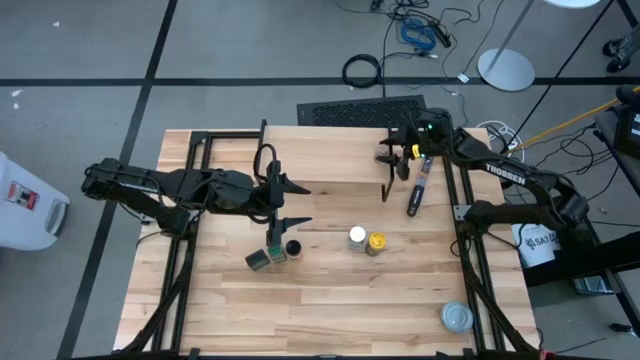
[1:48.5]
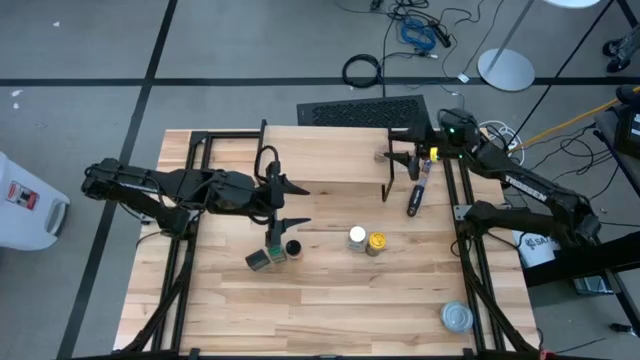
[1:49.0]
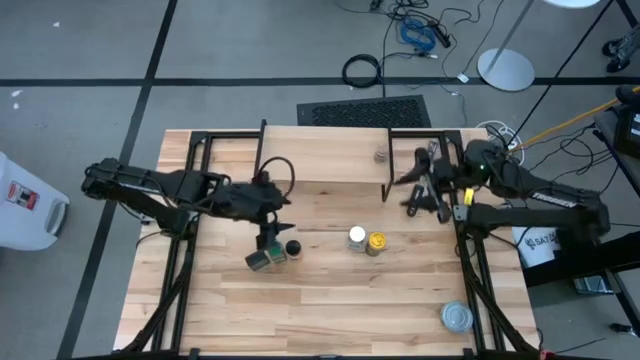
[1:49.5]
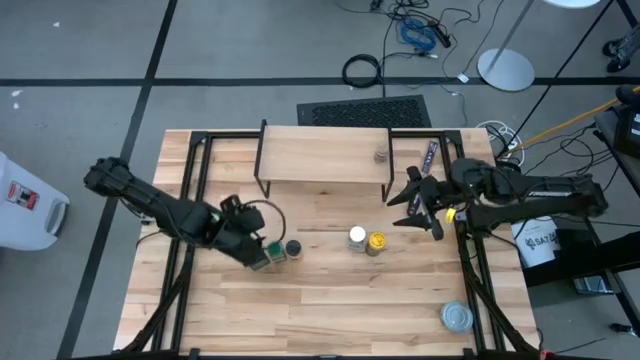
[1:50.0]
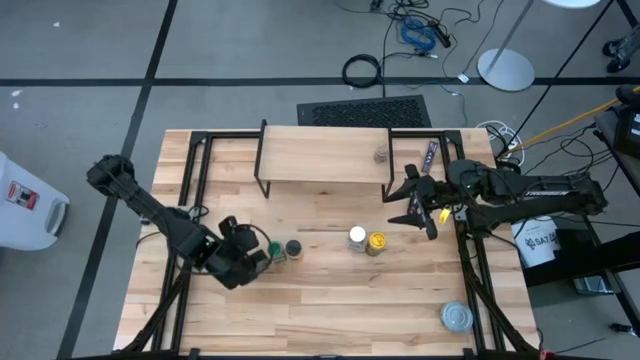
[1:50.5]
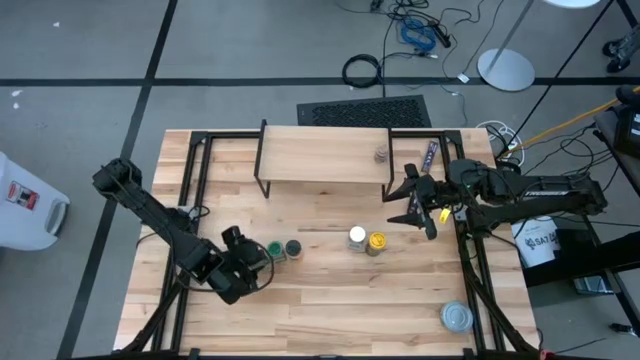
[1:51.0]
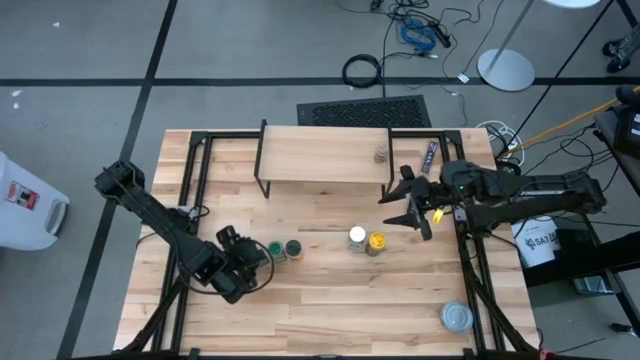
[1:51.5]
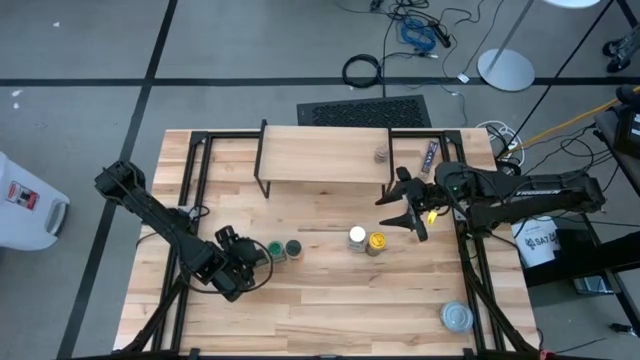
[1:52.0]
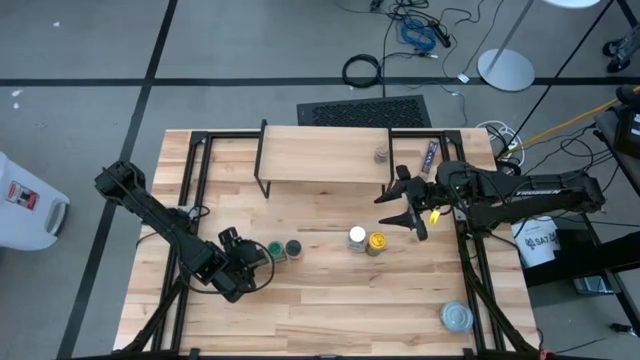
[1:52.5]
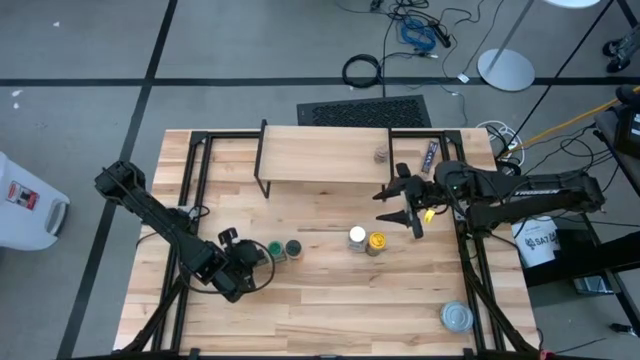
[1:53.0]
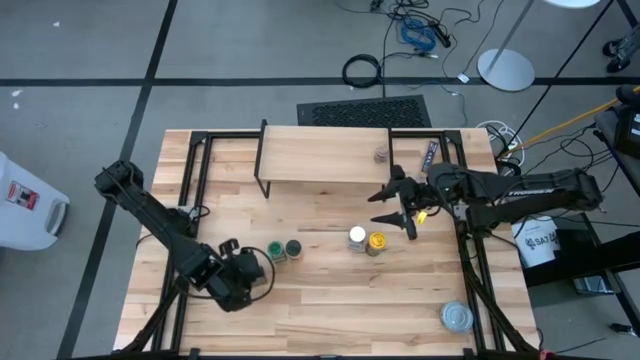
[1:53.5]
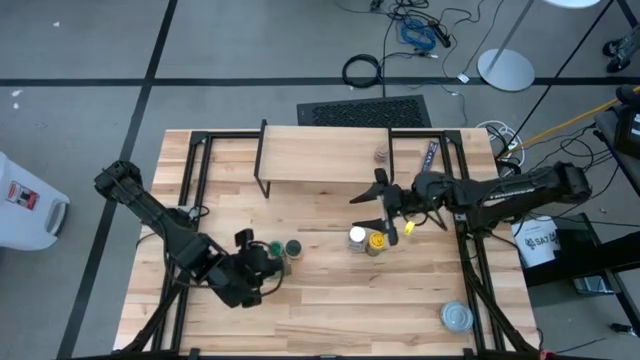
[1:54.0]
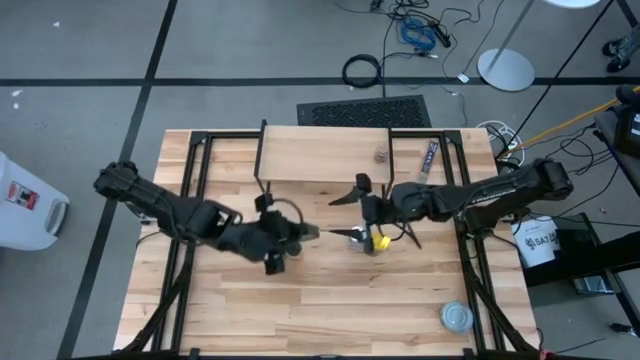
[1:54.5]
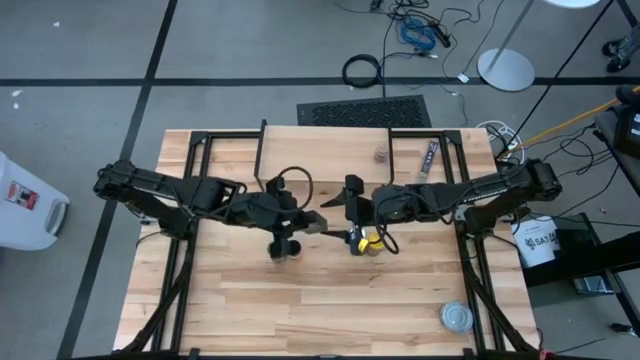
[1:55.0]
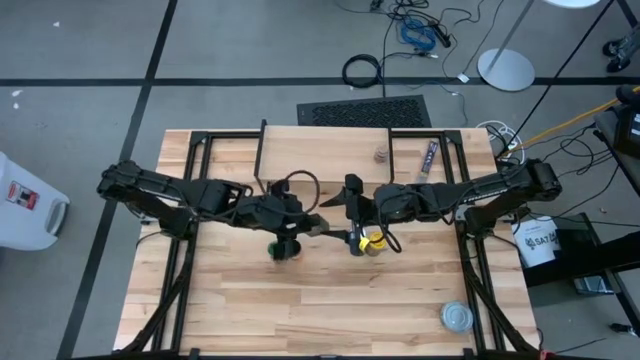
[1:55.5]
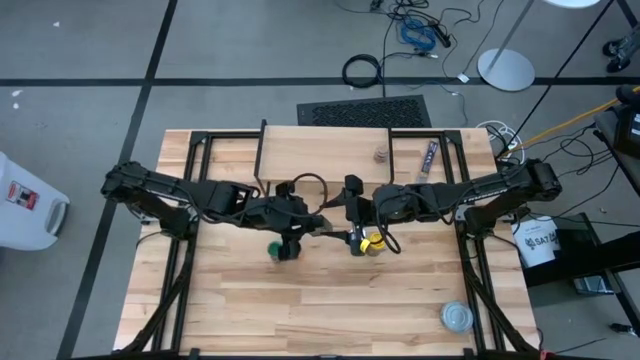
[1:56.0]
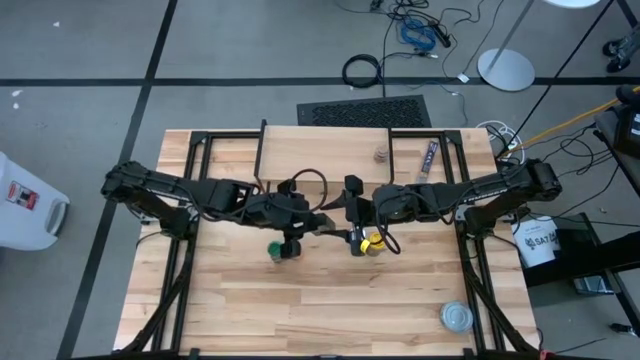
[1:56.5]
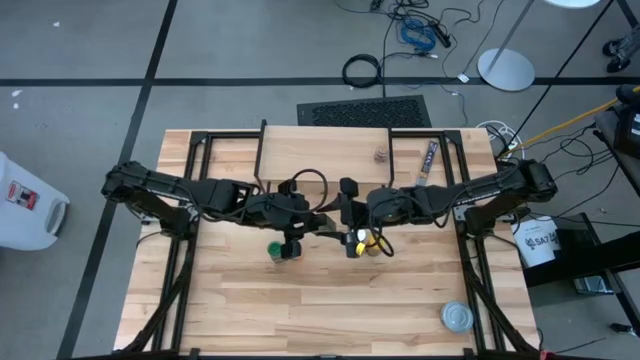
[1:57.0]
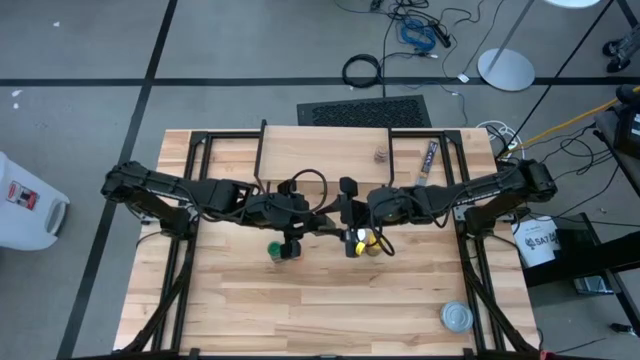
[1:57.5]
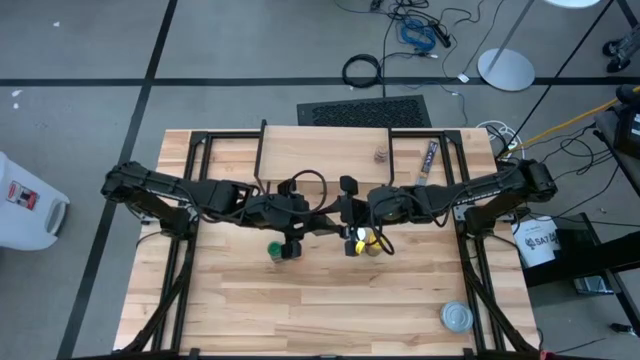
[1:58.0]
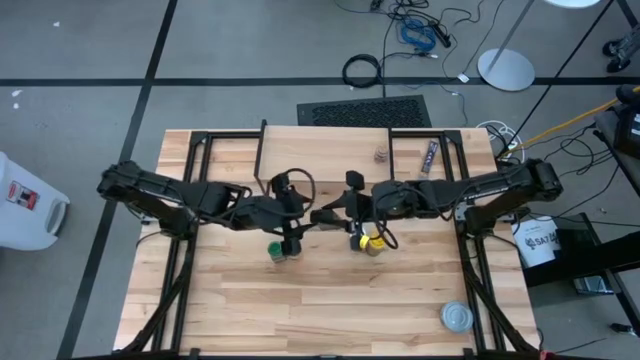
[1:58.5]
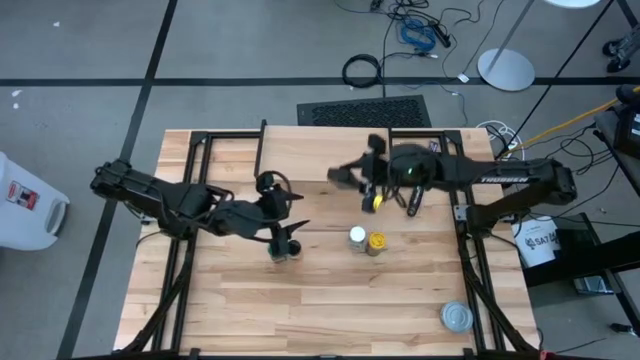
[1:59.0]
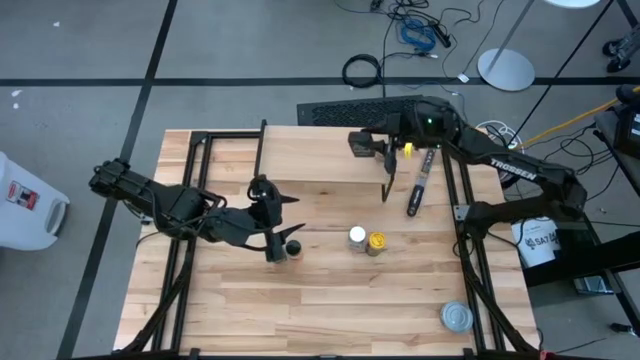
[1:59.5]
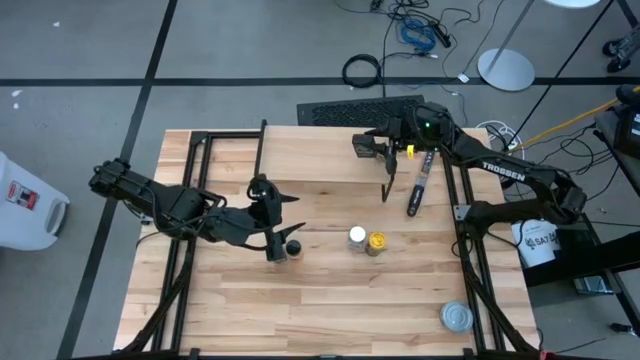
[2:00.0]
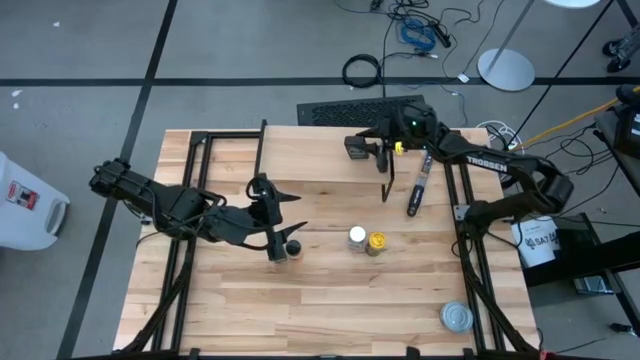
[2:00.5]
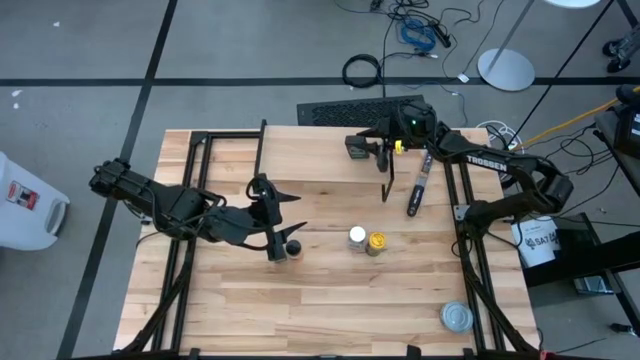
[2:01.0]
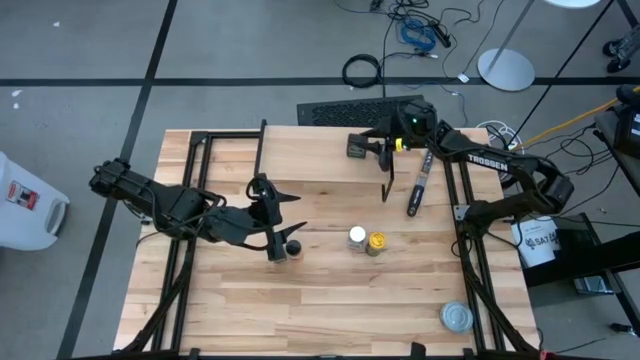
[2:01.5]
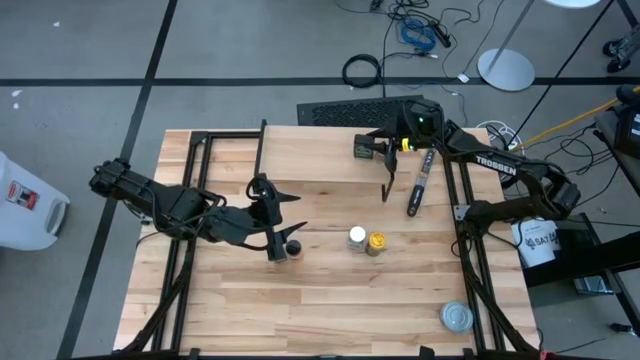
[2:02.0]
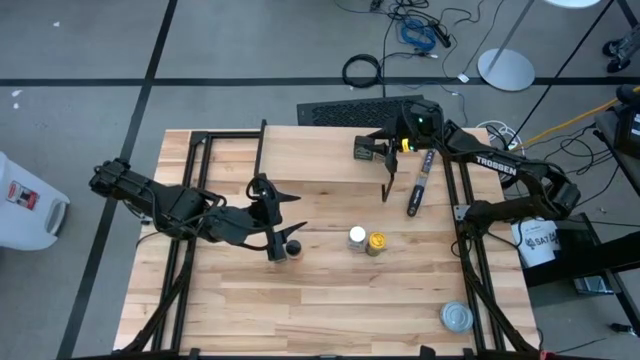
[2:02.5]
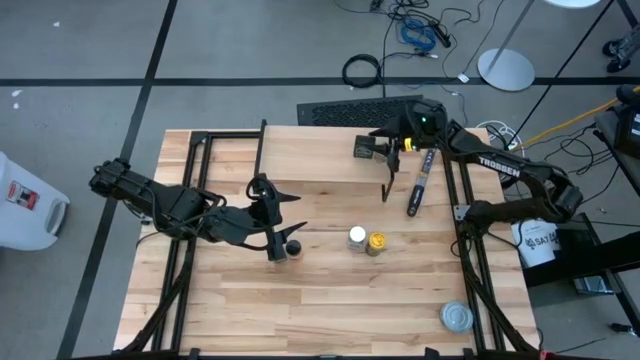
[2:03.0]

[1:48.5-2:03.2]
Task: Shelf spices
Put the black seasoning can on the shelf

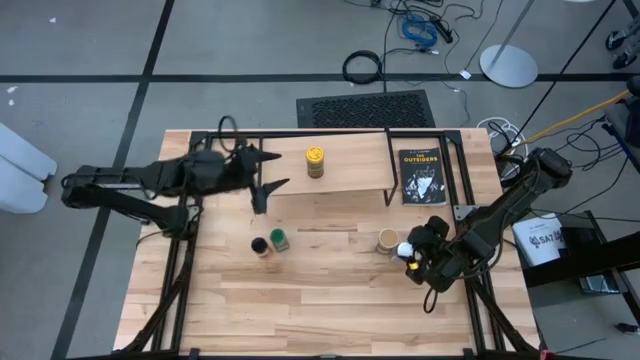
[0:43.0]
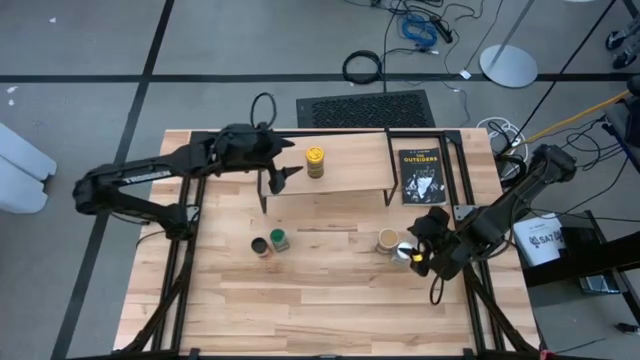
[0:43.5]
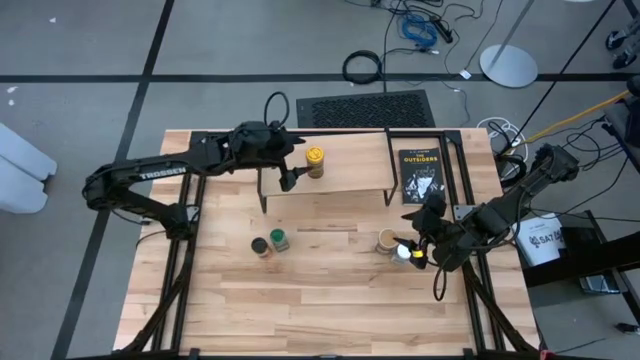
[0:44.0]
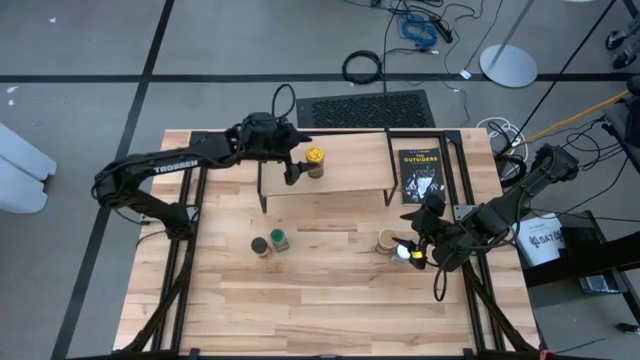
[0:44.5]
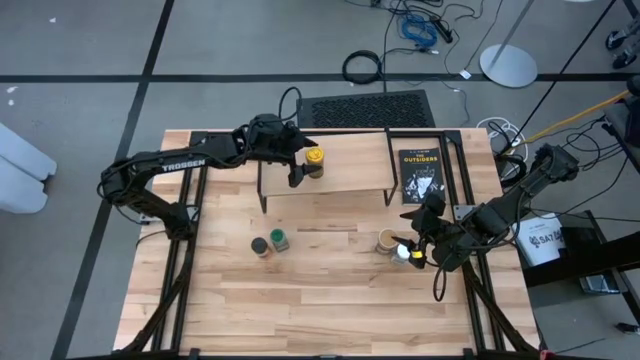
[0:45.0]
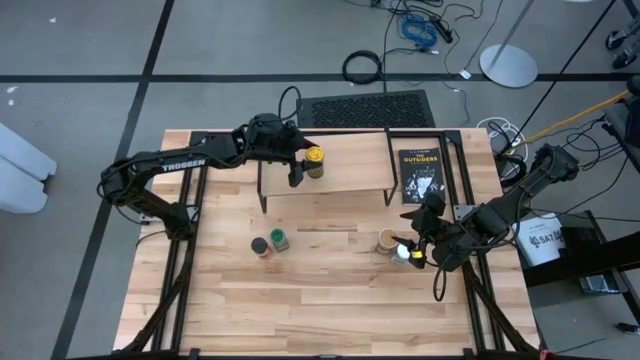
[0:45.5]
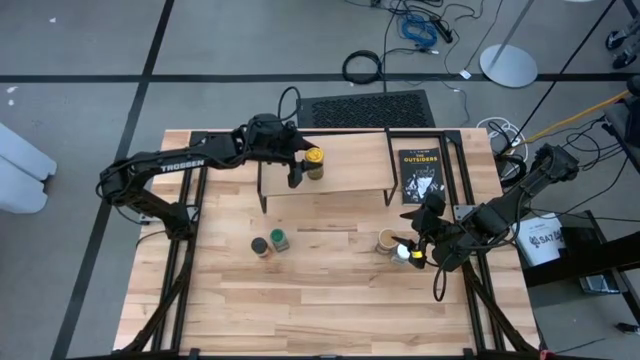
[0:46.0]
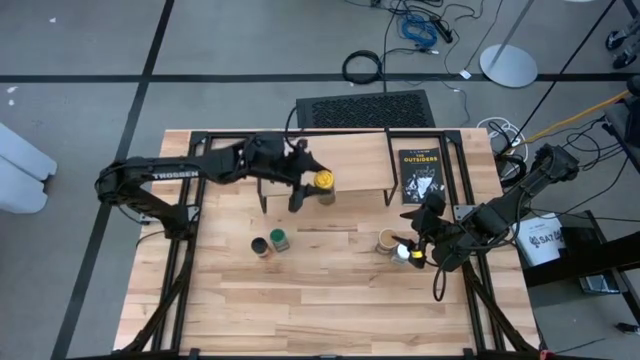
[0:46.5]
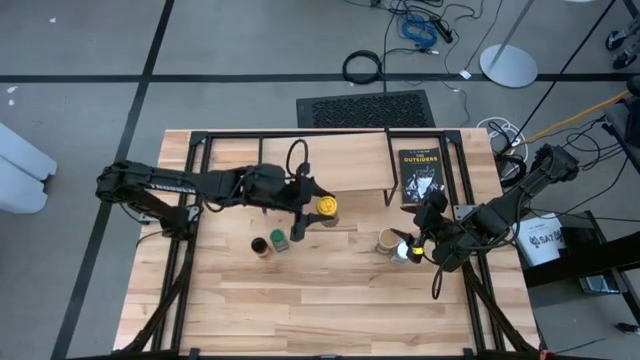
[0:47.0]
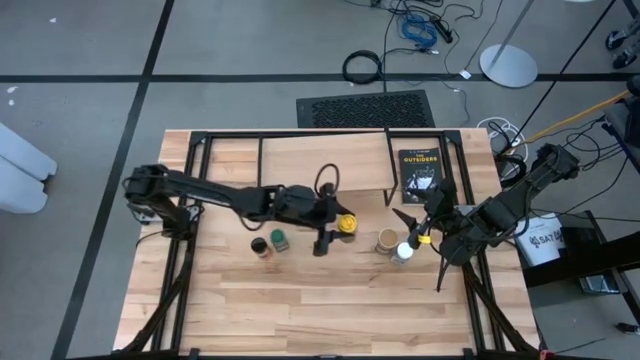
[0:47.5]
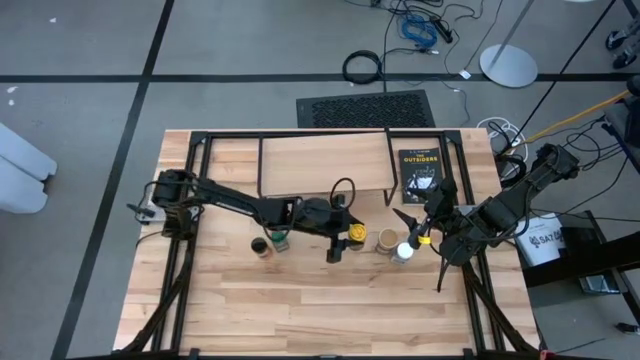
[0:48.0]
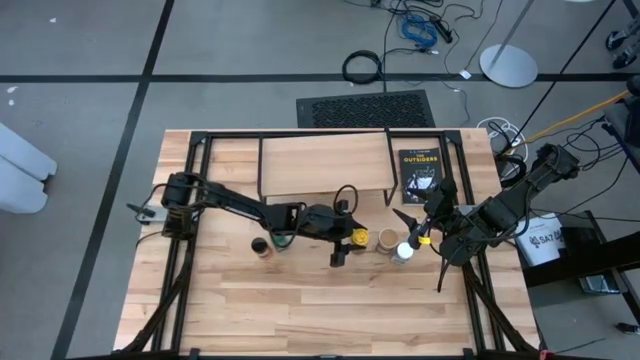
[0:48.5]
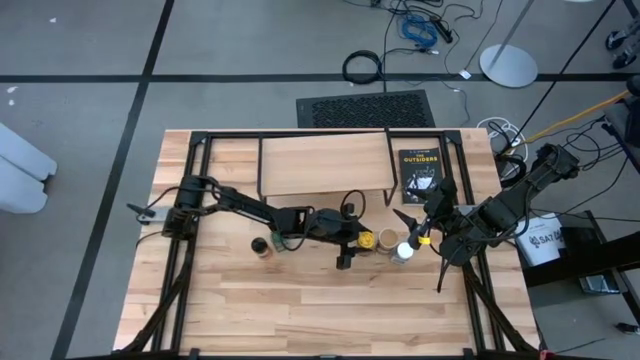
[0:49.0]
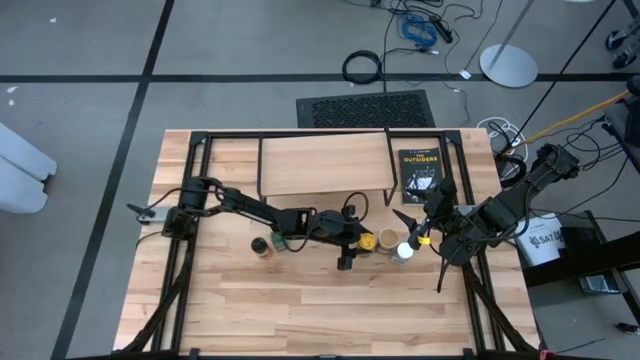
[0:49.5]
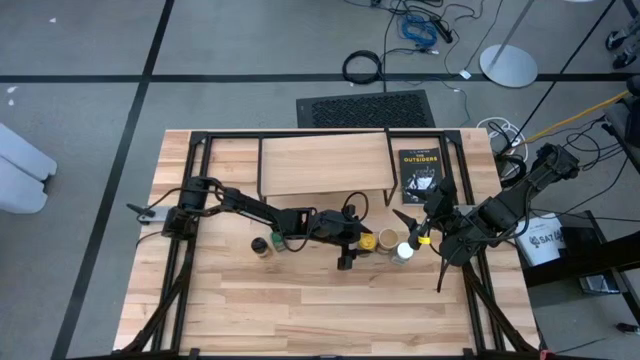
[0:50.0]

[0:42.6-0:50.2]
Task: Shelf spices
Remove the yellow seasoning bottle from the shelf
